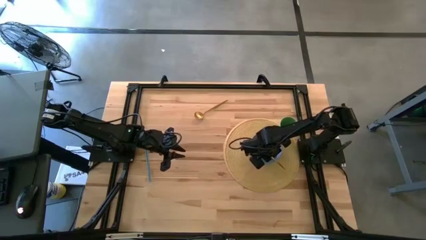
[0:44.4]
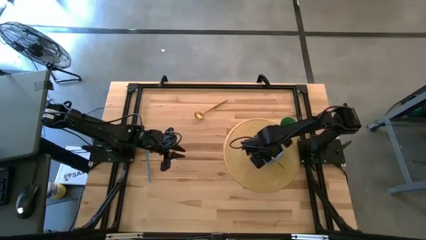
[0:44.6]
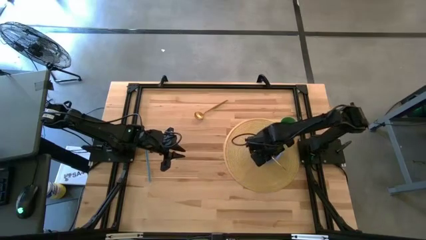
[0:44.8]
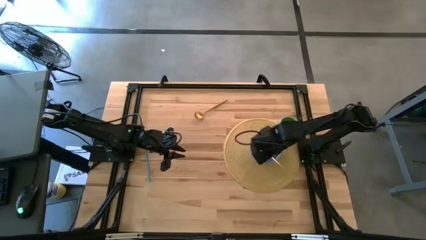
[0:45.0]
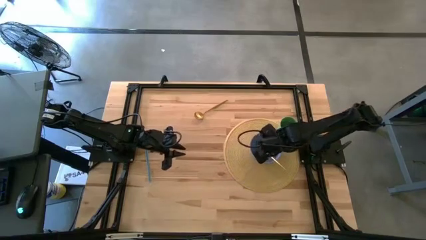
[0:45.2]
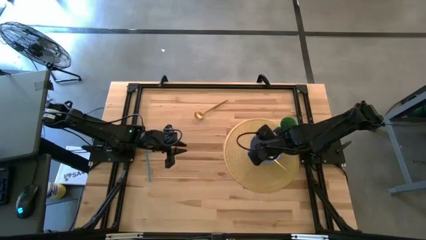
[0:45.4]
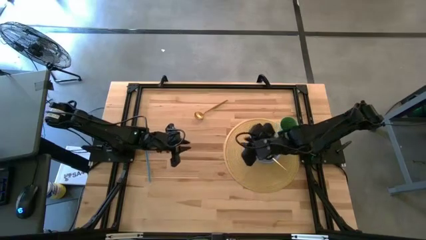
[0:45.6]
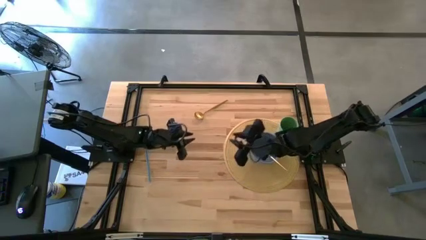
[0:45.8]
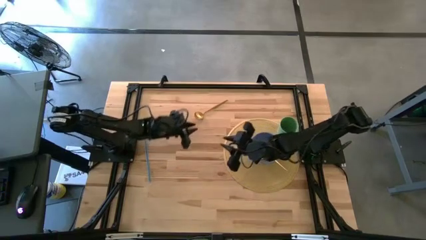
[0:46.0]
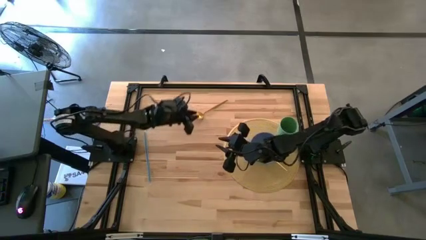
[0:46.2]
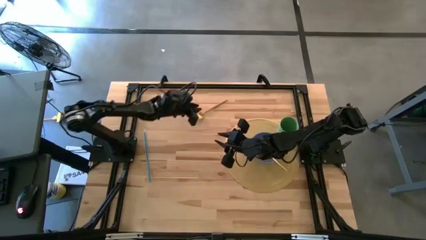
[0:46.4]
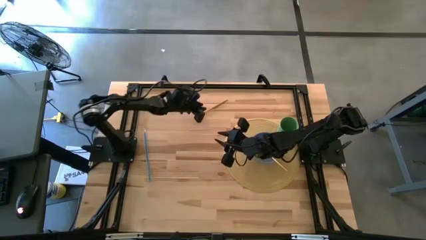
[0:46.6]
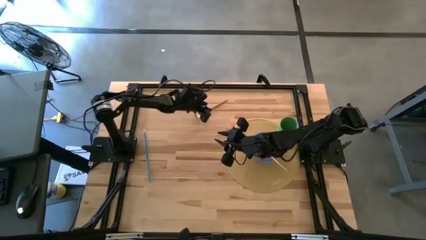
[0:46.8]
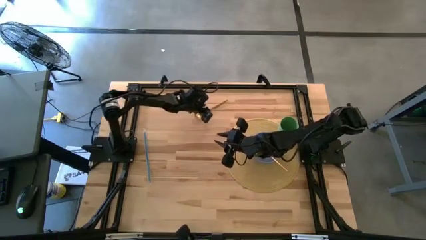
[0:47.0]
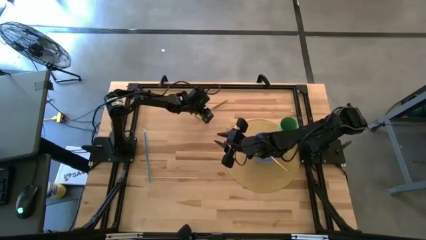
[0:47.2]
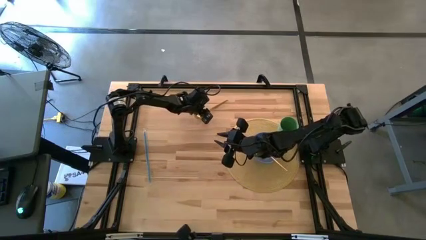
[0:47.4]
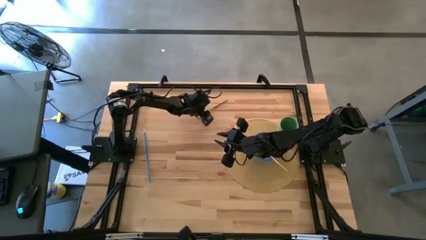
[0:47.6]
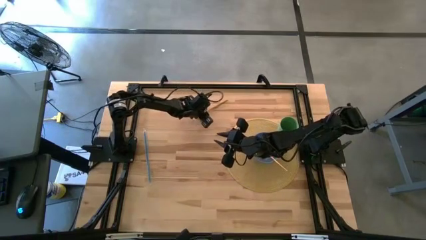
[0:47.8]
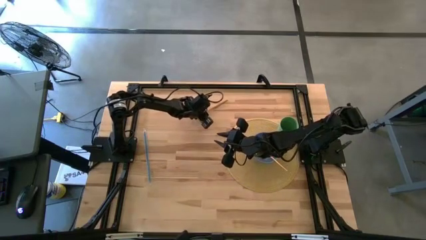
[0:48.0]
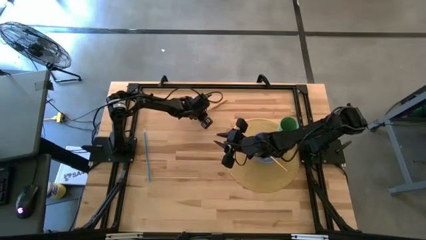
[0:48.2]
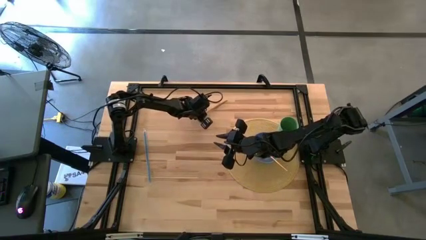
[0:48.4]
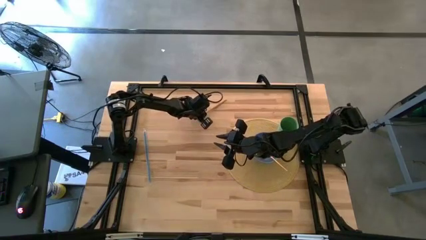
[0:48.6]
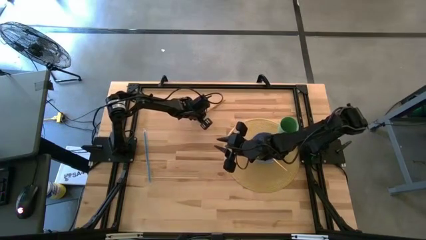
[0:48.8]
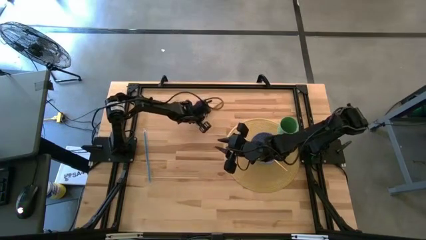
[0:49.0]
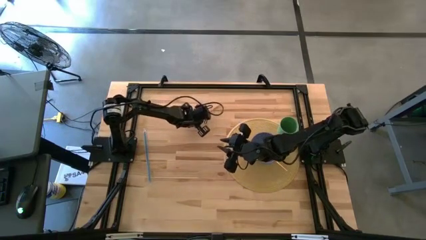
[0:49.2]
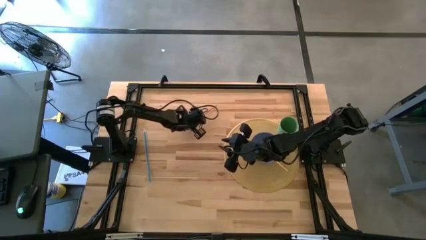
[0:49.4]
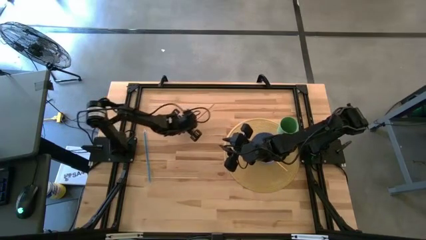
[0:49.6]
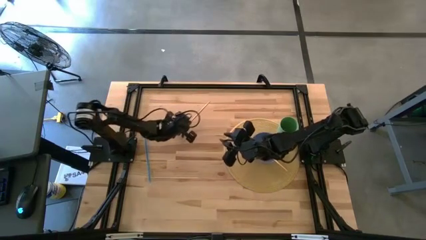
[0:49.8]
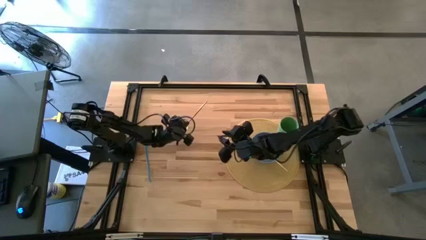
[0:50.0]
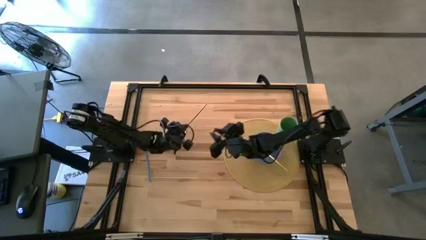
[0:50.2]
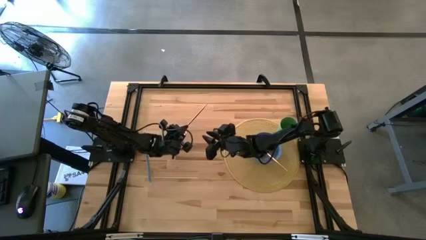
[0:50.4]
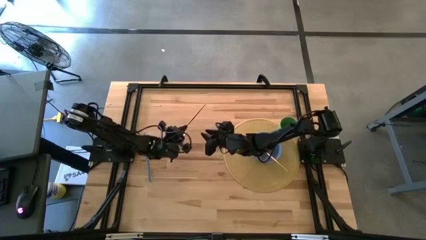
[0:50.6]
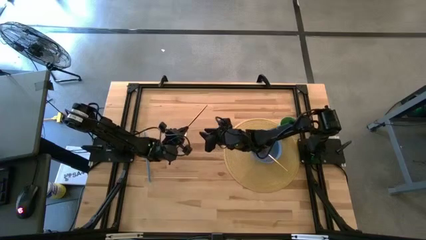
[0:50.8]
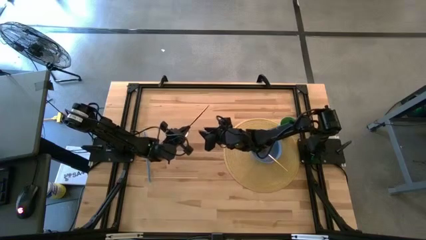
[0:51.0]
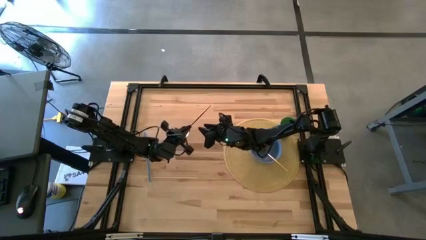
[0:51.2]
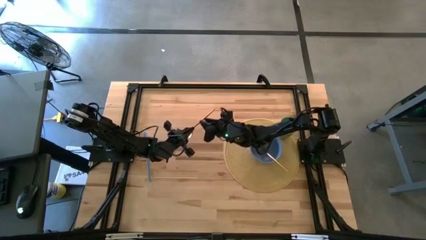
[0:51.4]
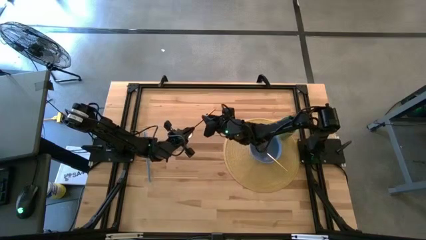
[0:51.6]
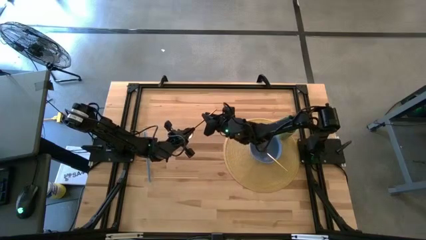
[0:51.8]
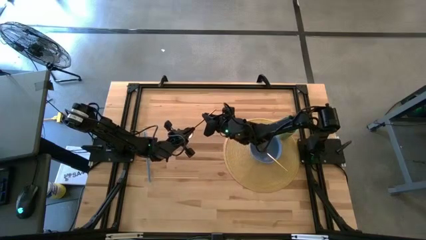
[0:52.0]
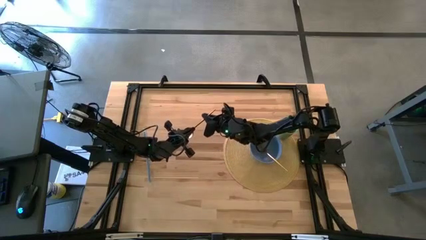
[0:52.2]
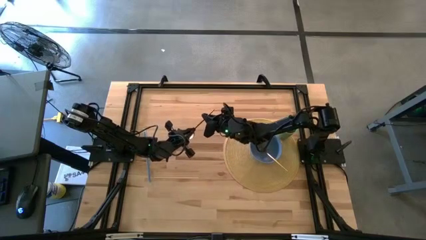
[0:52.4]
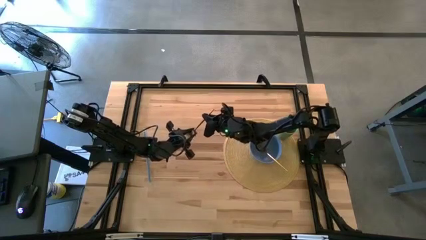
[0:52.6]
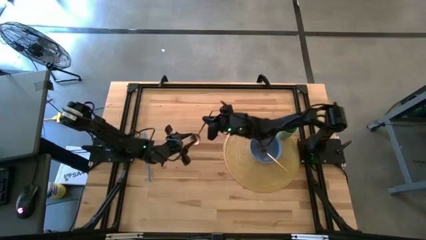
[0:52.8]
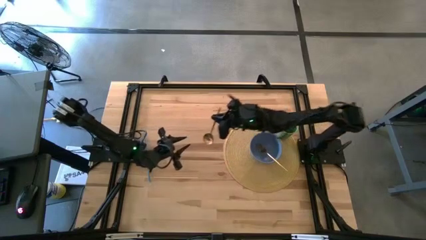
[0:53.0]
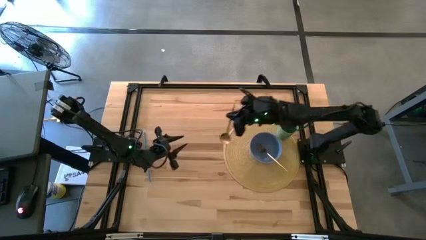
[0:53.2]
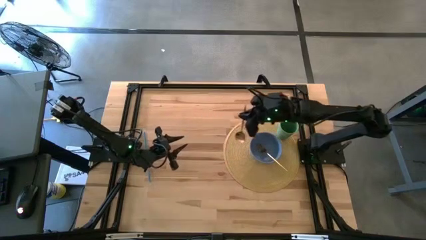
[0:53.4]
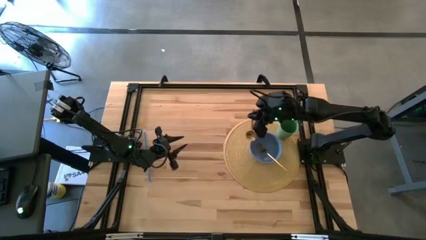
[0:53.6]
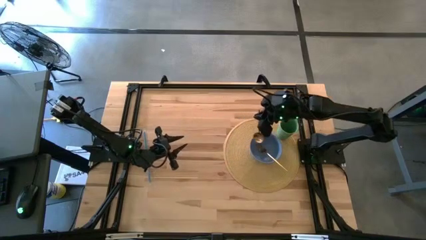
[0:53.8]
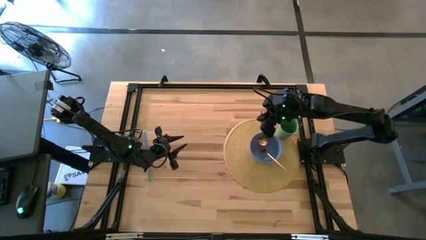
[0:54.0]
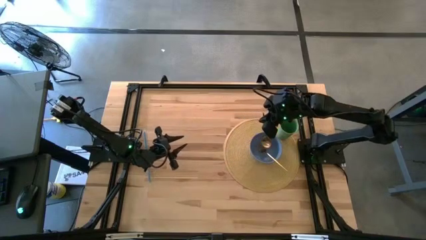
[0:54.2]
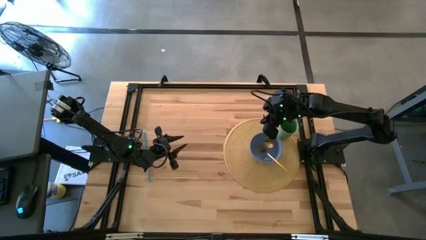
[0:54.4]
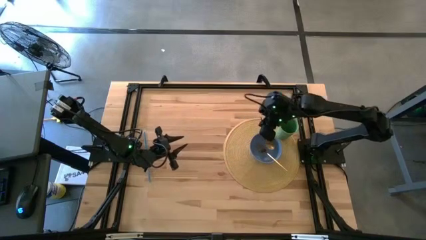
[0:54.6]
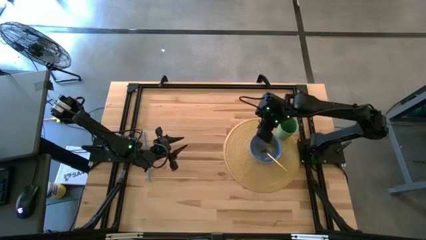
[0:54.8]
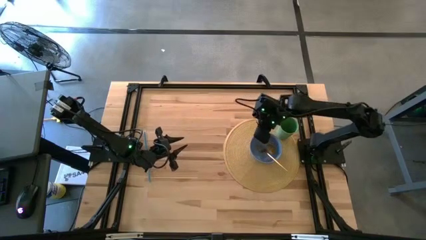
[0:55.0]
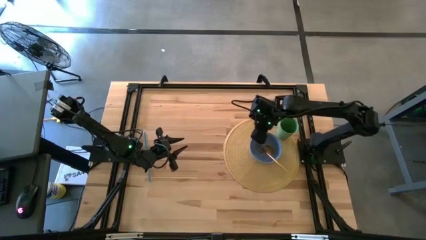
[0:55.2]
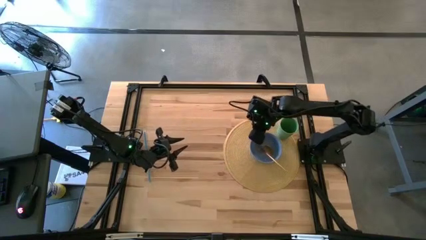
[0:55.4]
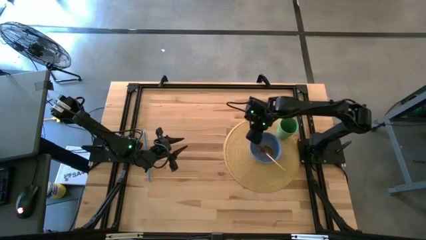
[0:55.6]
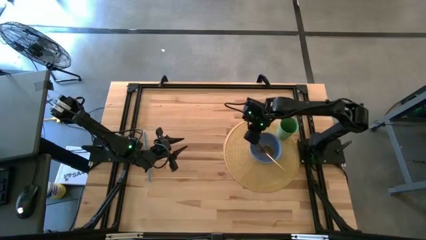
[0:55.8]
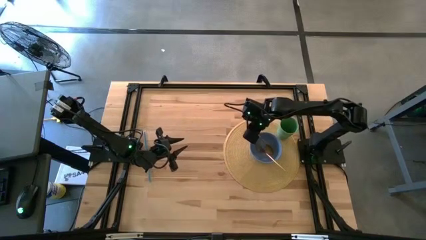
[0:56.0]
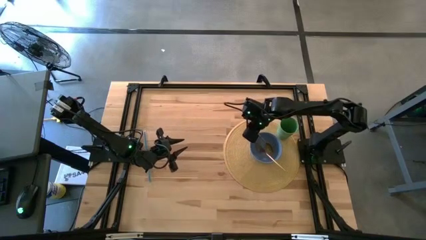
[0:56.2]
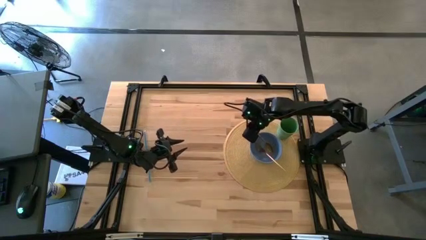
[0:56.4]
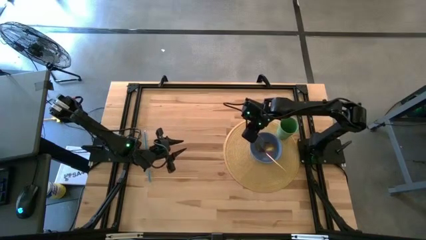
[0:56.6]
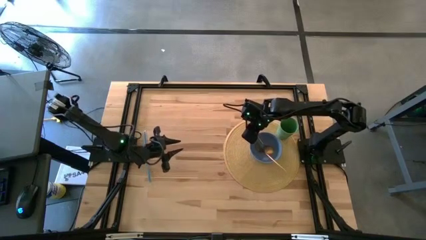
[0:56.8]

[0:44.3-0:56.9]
Task: Pick & Place Utensil
Put the gold spoon into the blue bowl on the brown placemat
